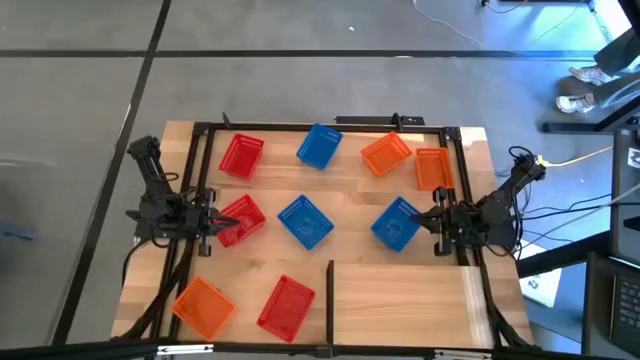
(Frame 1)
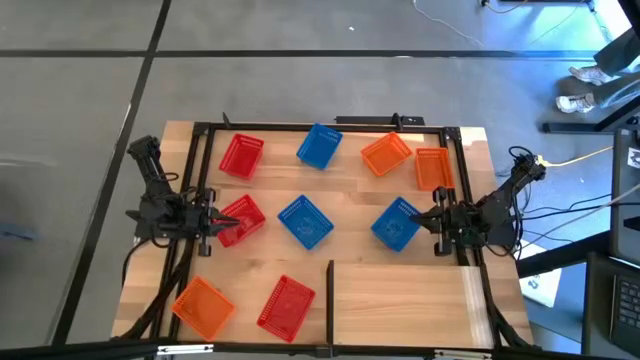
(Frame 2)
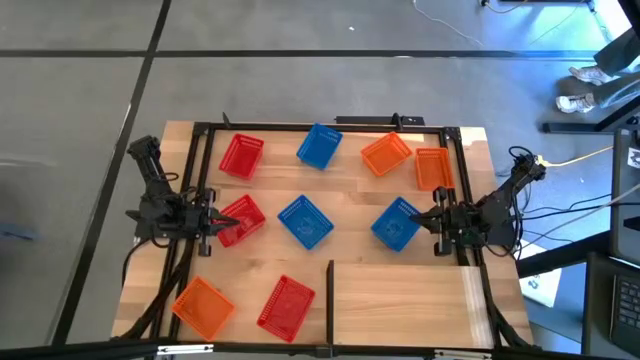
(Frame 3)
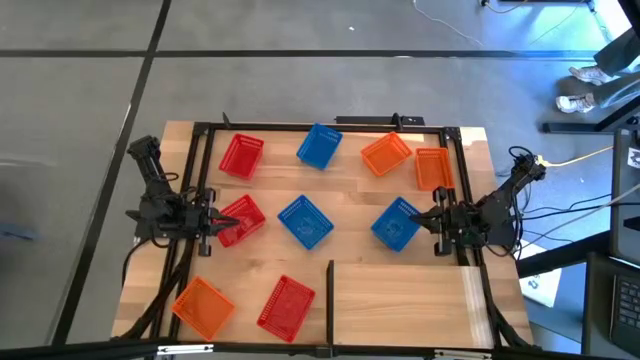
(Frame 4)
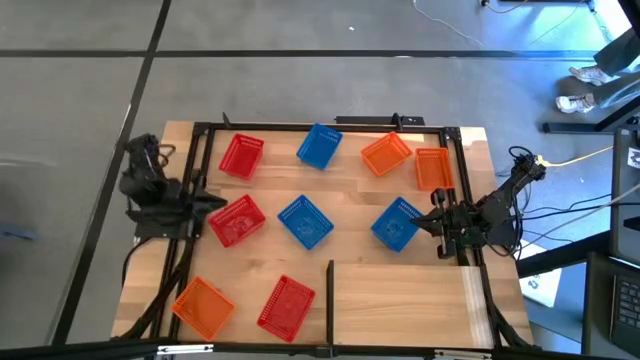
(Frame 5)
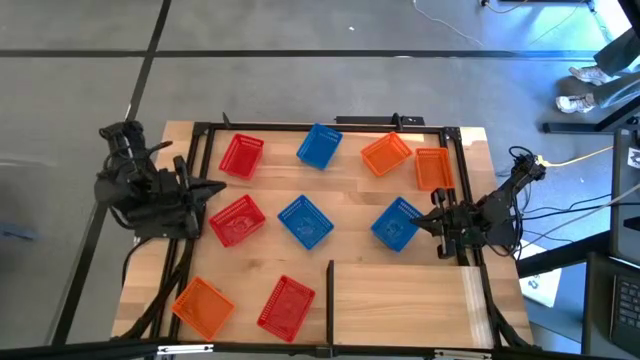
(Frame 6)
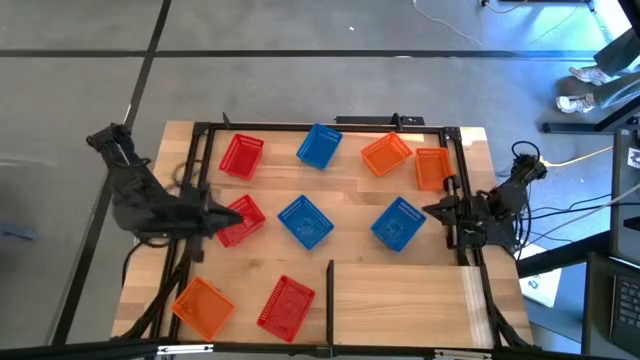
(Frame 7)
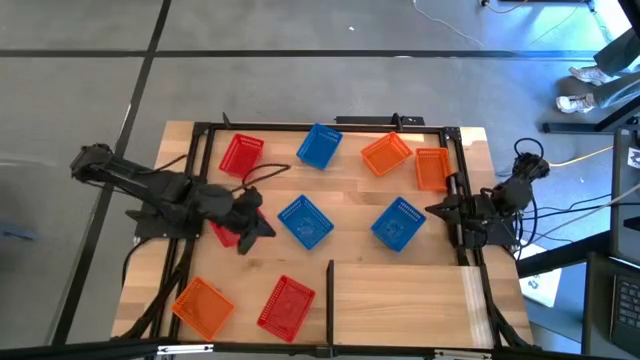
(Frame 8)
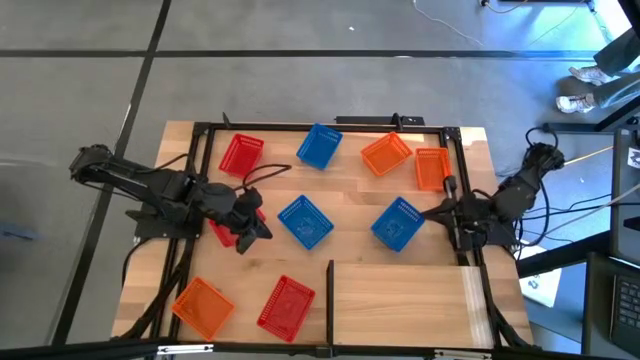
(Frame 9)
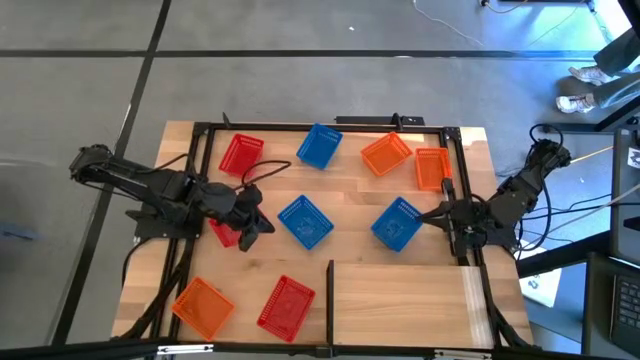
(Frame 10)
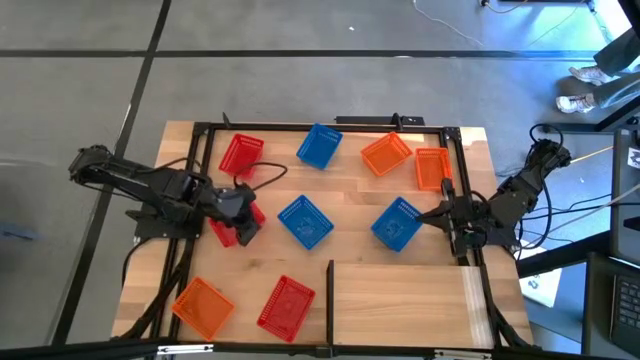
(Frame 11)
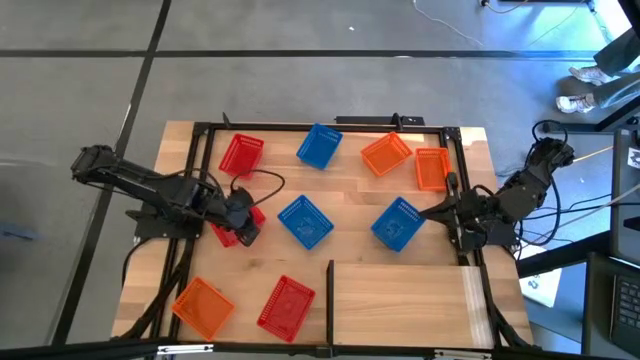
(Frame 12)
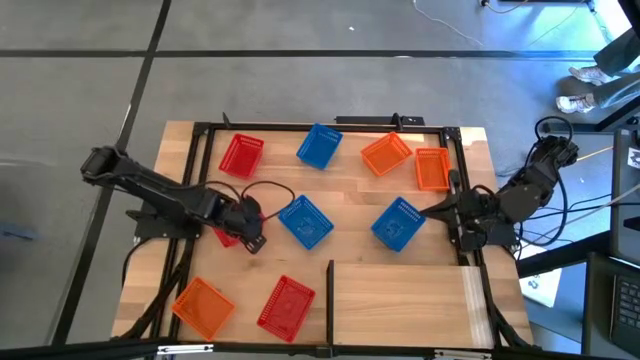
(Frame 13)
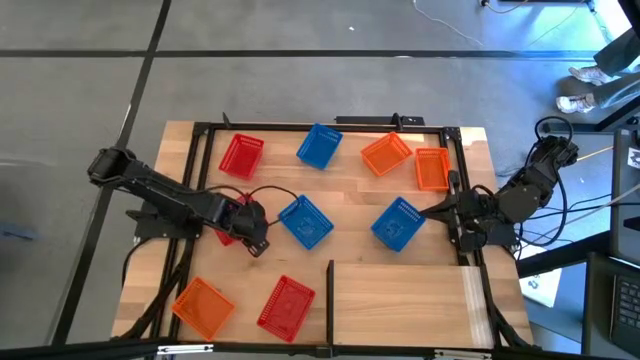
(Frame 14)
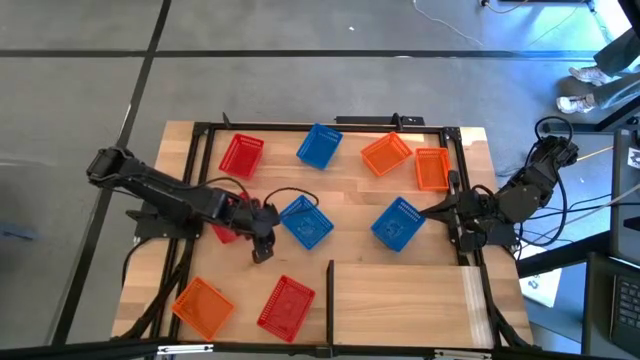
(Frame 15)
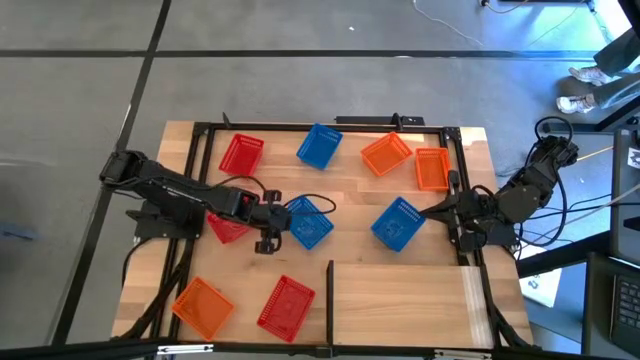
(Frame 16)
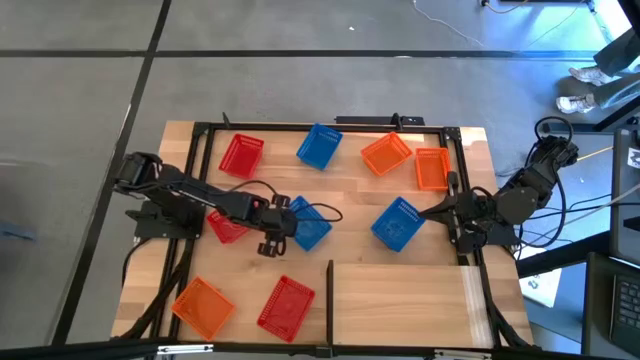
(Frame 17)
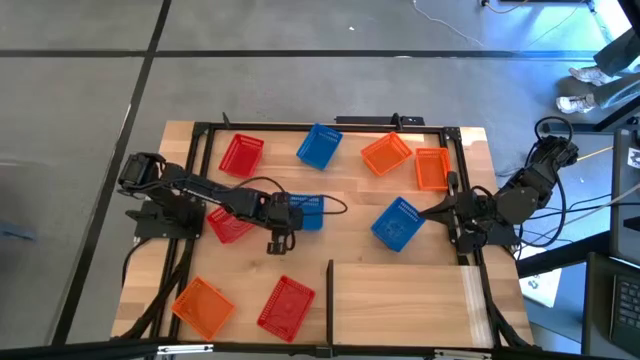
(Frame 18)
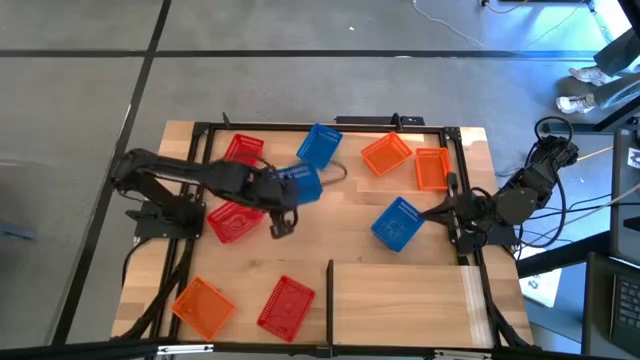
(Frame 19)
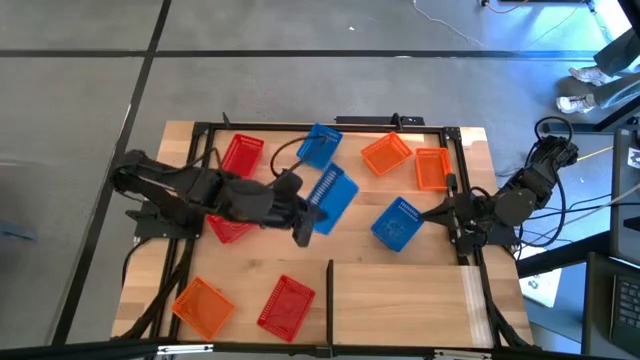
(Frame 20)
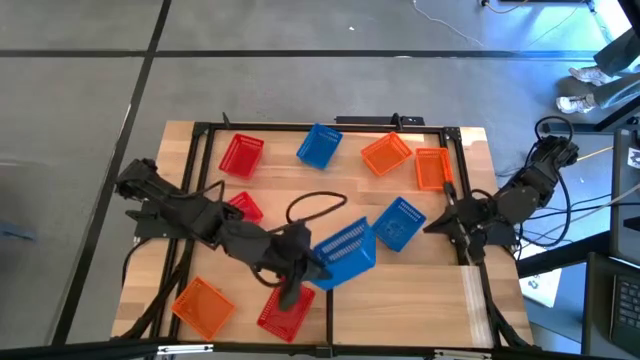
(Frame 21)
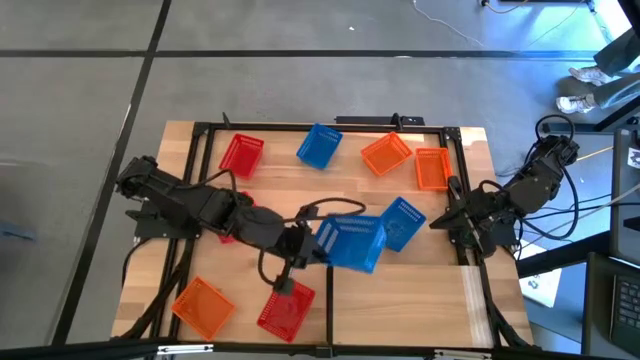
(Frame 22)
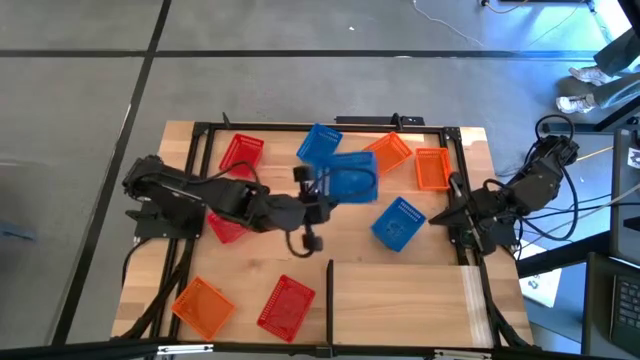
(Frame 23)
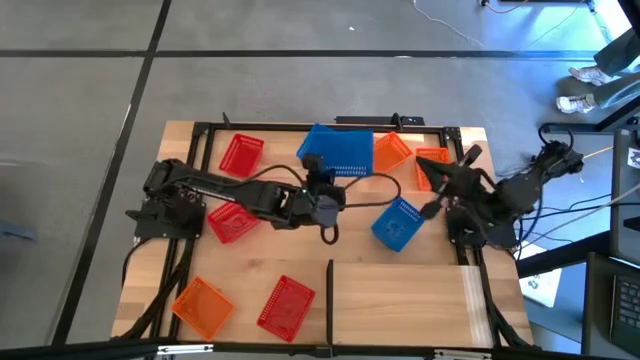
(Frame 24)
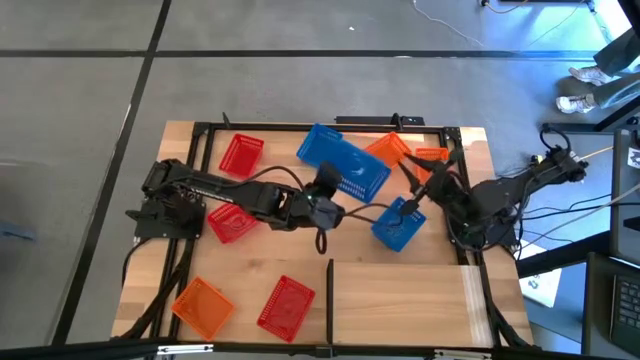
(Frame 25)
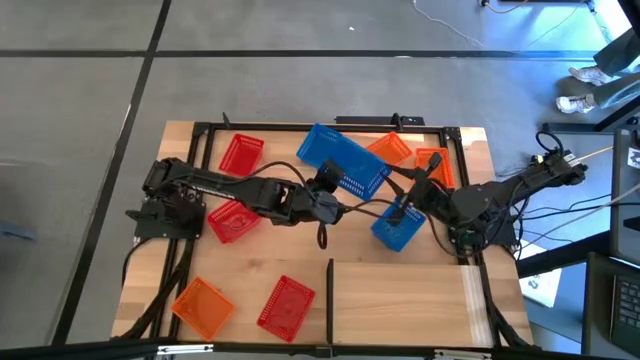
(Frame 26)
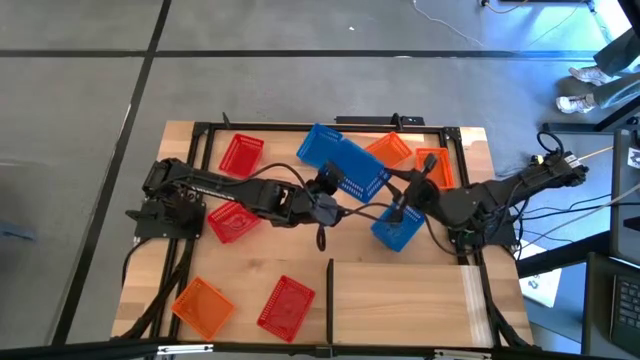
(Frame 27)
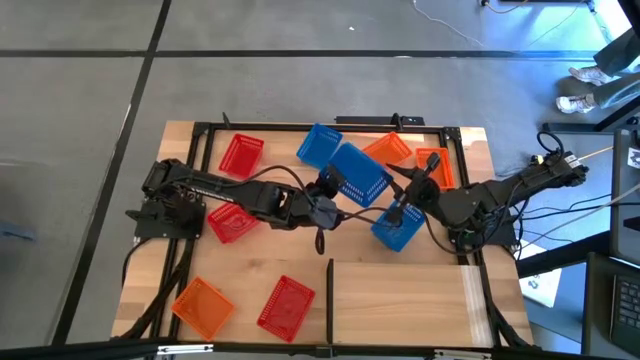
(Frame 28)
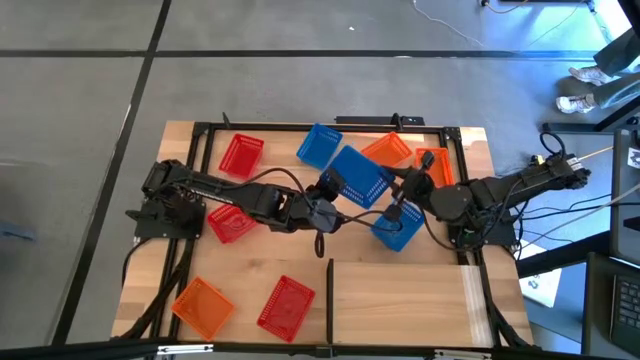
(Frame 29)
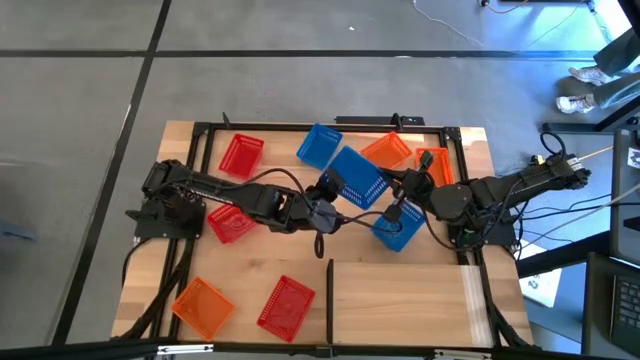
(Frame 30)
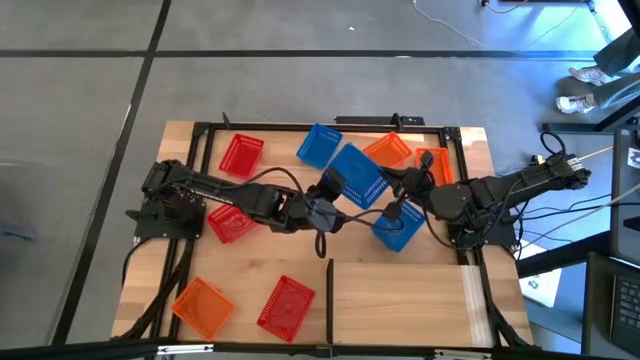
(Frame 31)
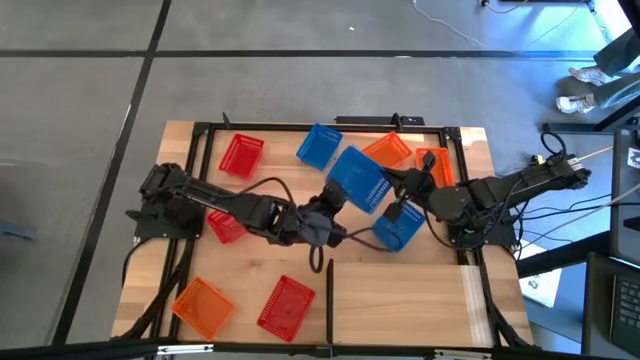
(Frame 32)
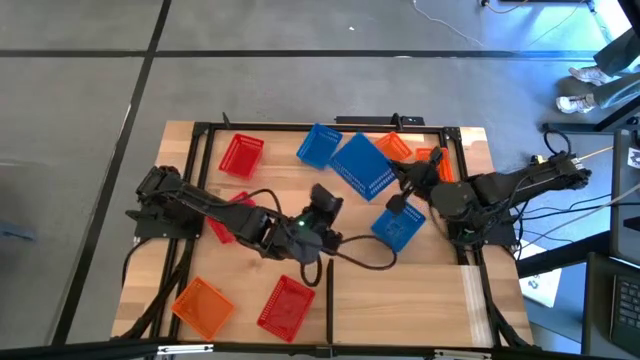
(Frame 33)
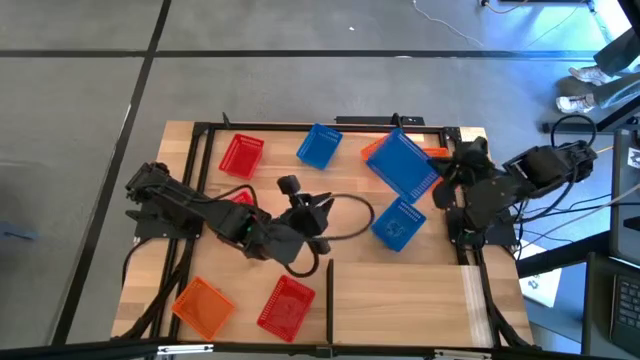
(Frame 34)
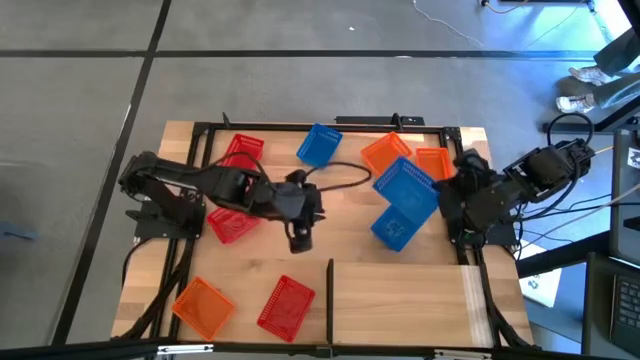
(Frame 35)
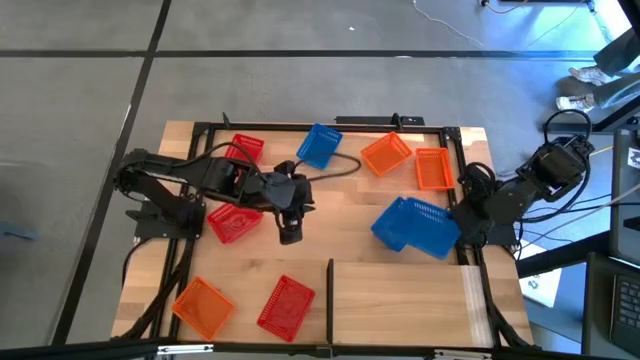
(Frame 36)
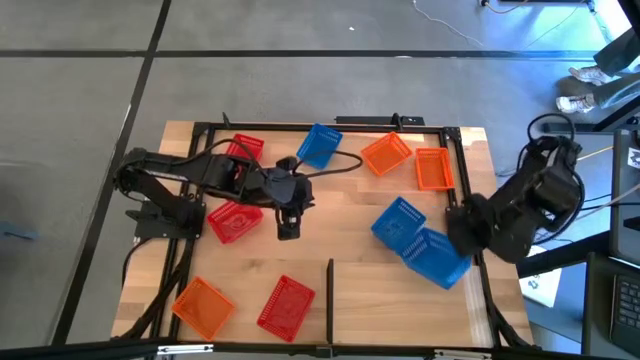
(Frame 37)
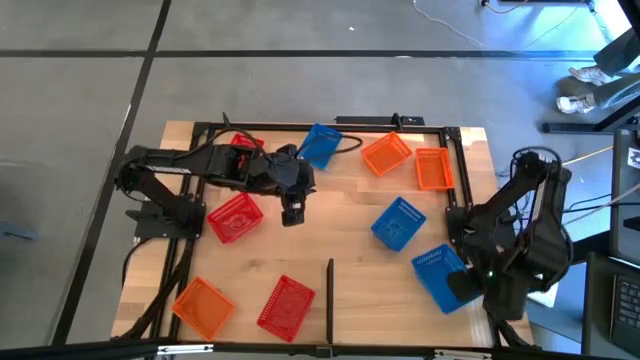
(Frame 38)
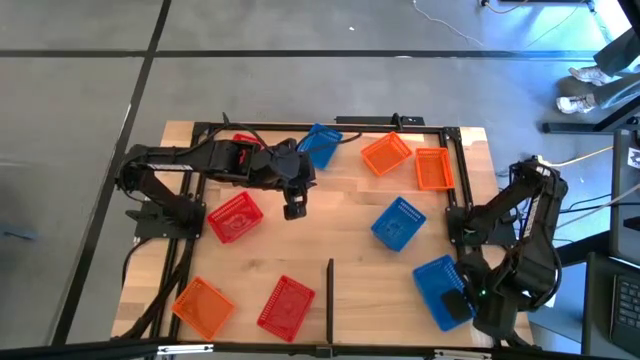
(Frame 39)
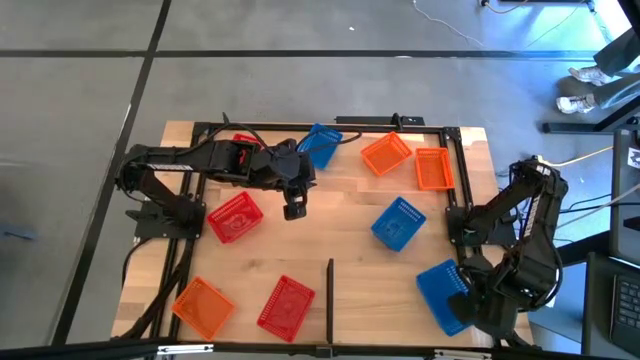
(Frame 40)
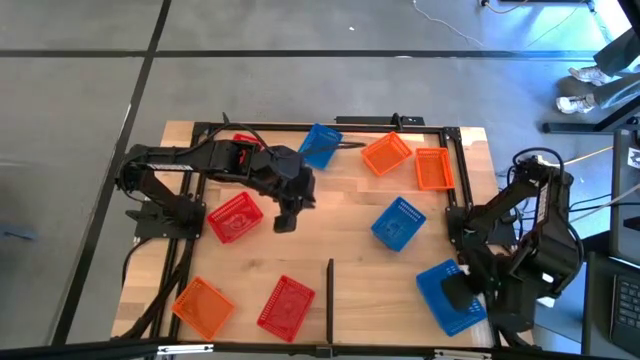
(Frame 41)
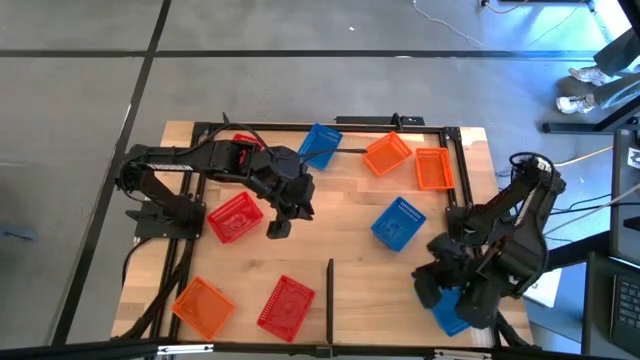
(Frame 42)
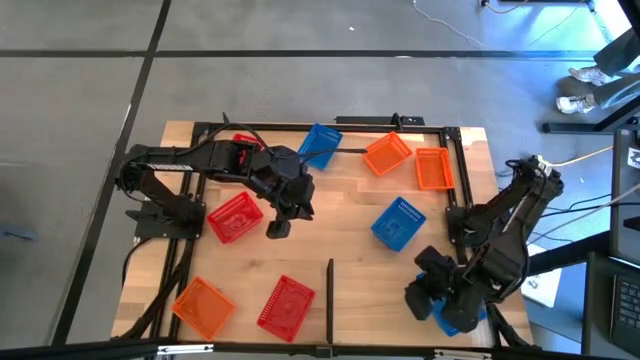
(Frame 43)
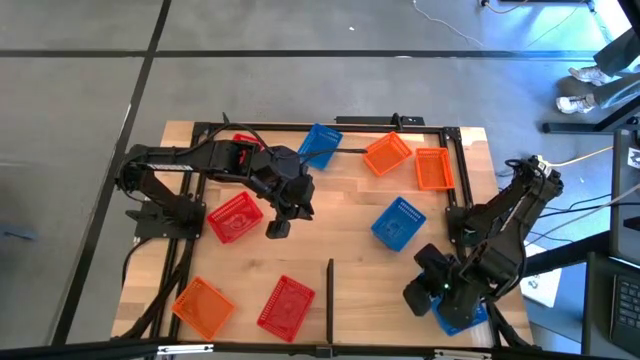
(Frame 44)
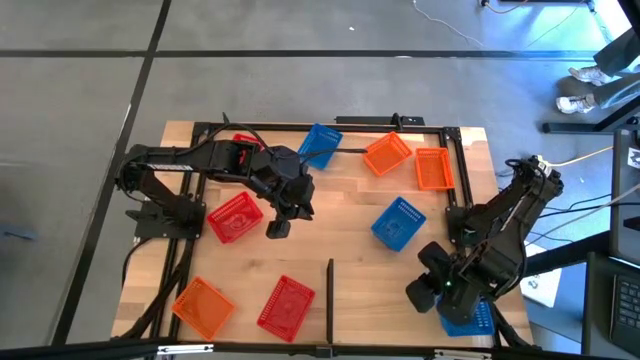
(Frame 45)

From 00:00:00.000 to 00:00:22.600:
Task: Stack baskets on shelf by color
Put the bottom left blue basket on the shelf
